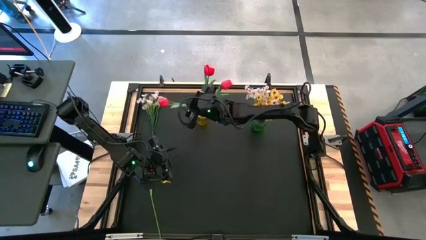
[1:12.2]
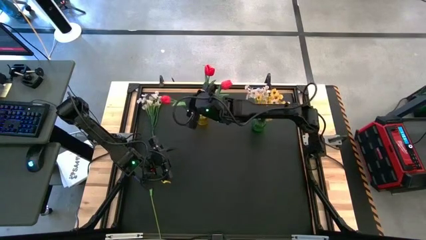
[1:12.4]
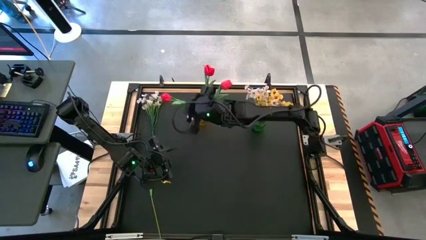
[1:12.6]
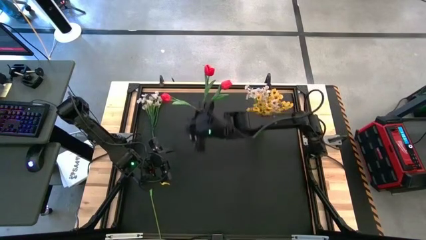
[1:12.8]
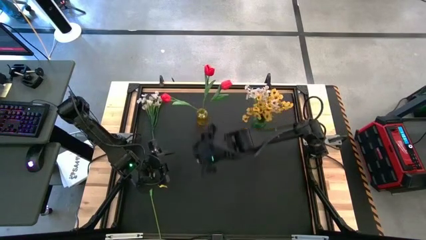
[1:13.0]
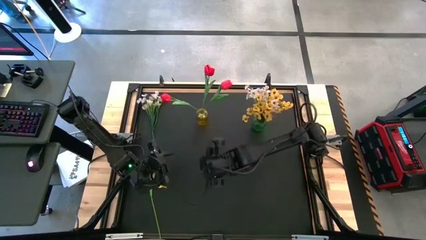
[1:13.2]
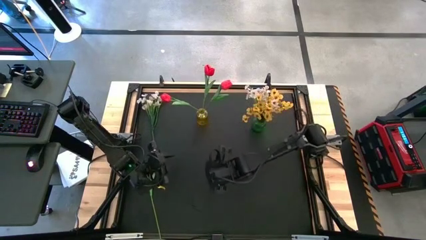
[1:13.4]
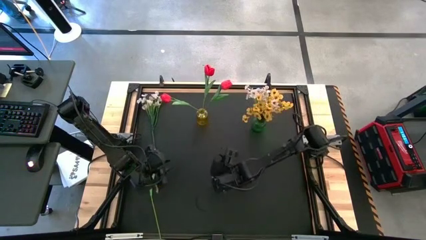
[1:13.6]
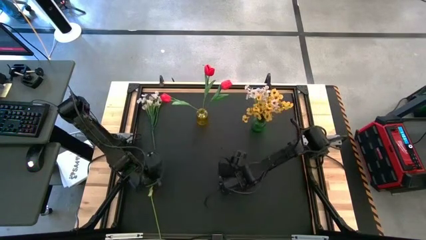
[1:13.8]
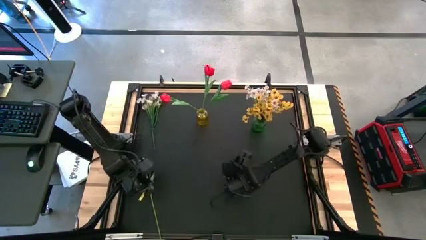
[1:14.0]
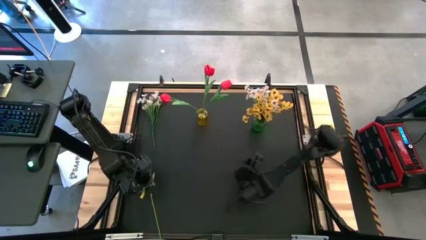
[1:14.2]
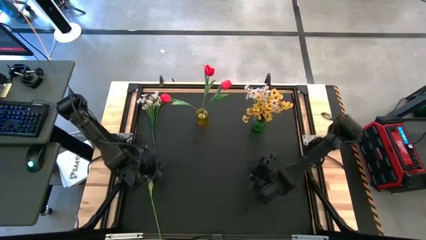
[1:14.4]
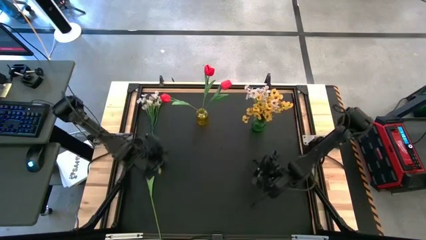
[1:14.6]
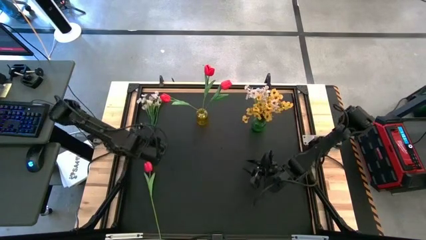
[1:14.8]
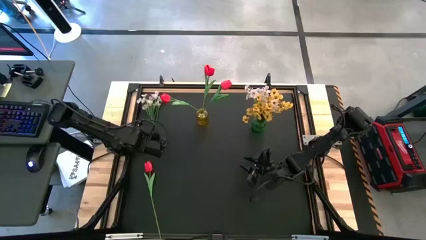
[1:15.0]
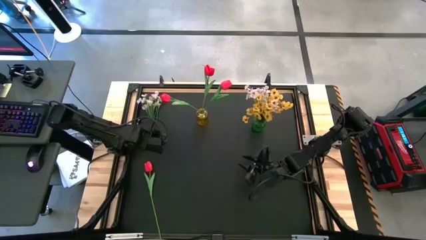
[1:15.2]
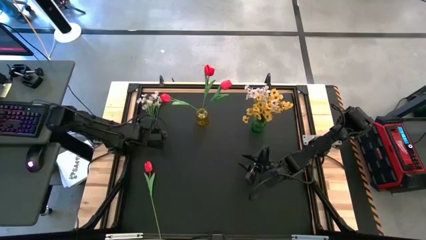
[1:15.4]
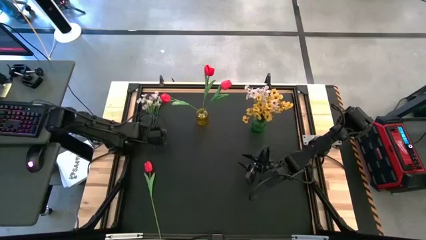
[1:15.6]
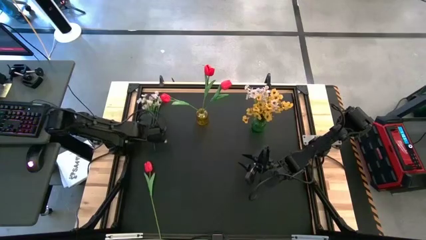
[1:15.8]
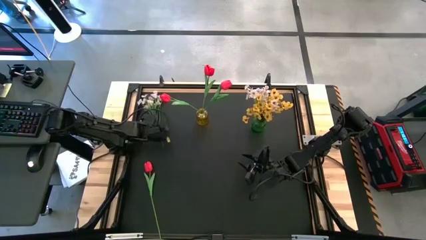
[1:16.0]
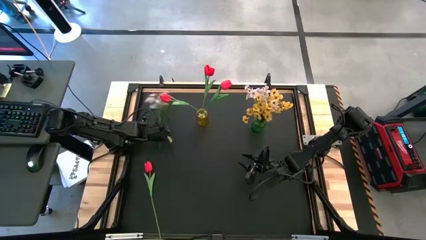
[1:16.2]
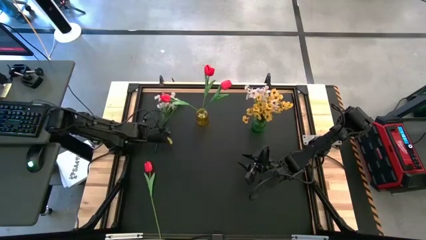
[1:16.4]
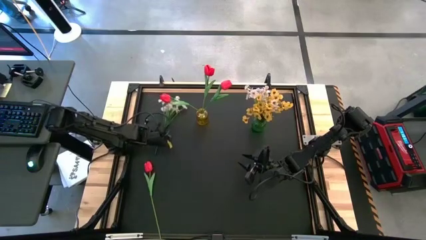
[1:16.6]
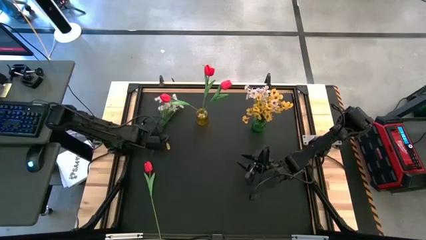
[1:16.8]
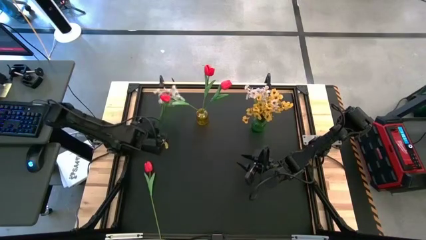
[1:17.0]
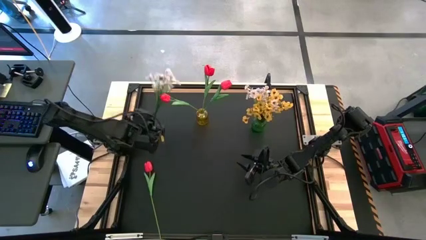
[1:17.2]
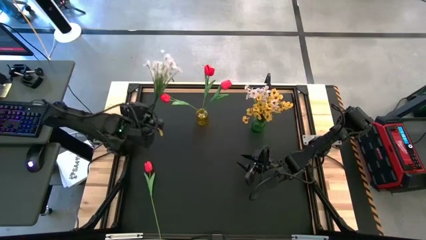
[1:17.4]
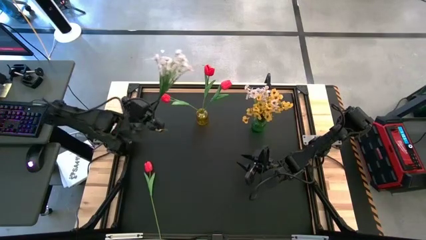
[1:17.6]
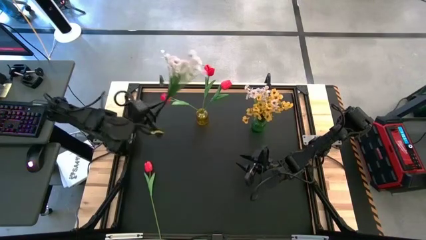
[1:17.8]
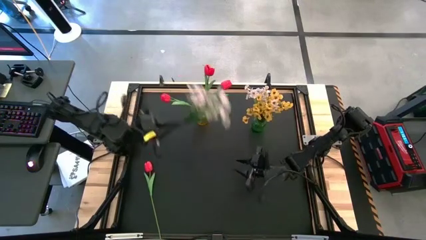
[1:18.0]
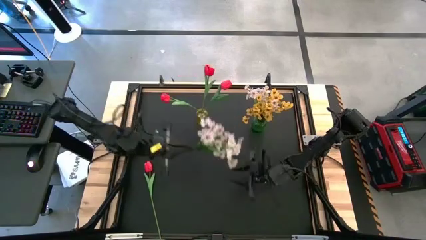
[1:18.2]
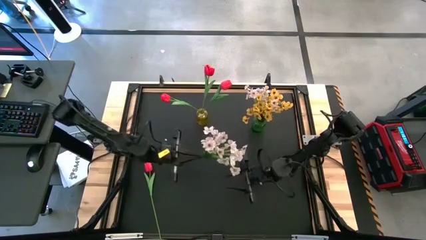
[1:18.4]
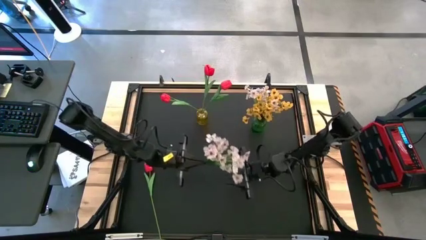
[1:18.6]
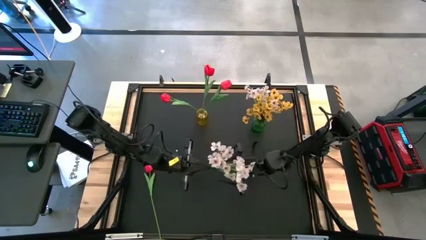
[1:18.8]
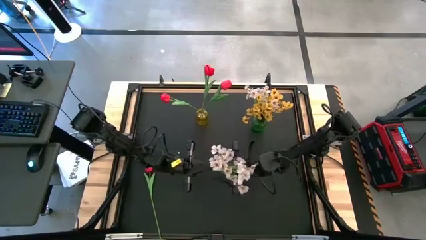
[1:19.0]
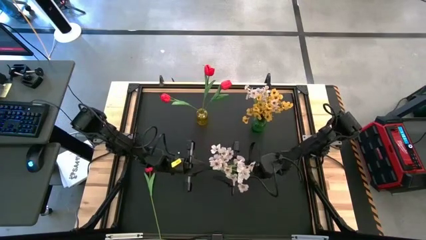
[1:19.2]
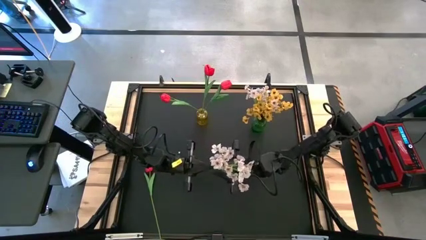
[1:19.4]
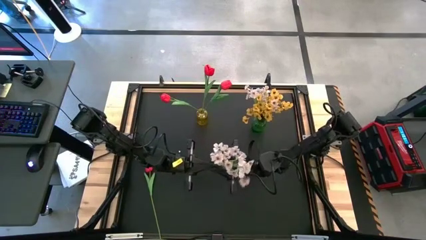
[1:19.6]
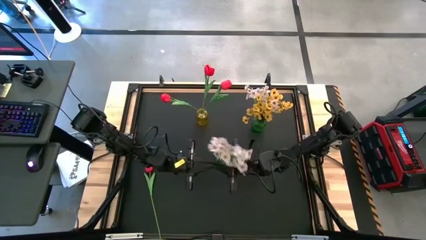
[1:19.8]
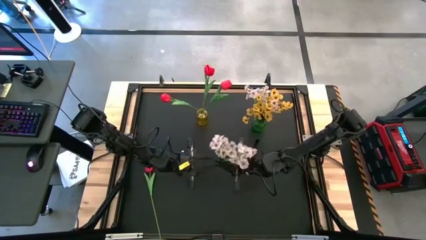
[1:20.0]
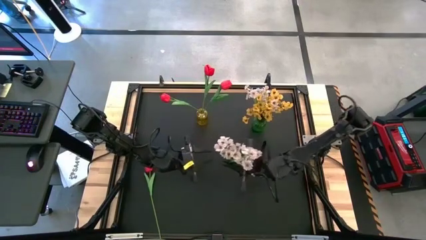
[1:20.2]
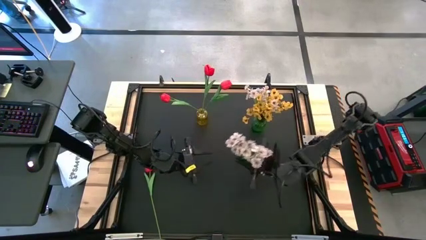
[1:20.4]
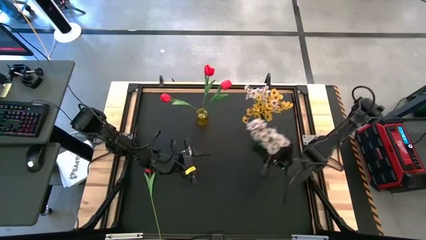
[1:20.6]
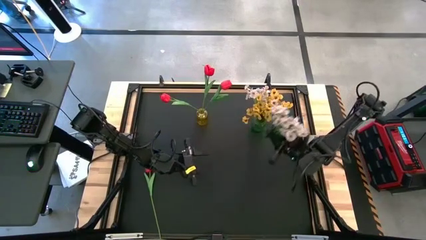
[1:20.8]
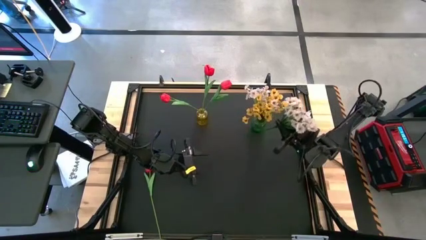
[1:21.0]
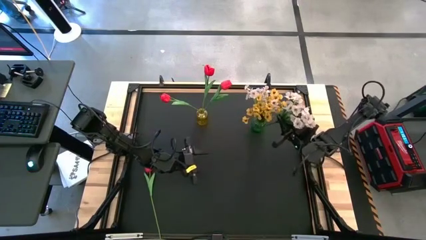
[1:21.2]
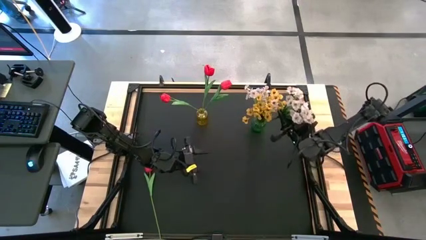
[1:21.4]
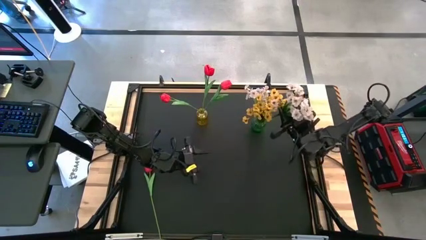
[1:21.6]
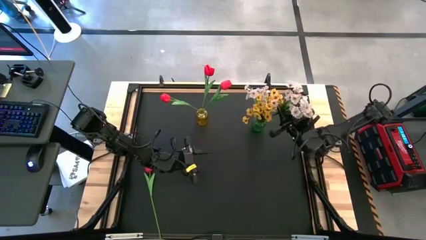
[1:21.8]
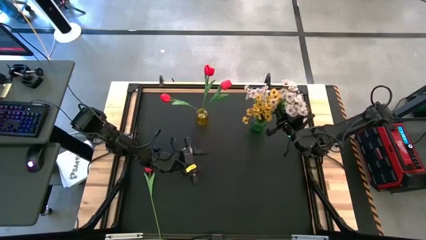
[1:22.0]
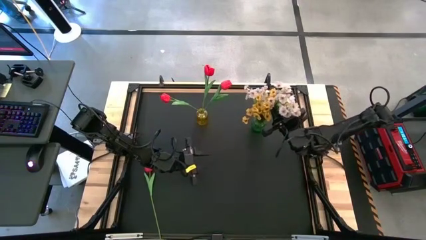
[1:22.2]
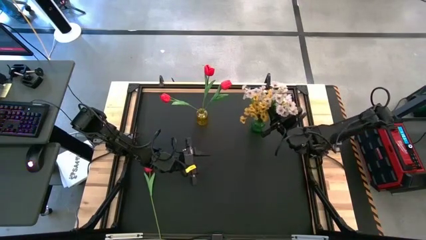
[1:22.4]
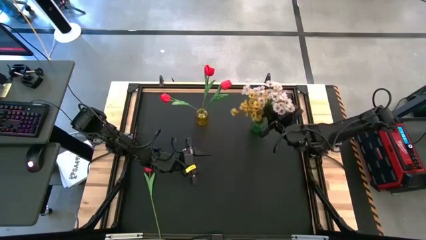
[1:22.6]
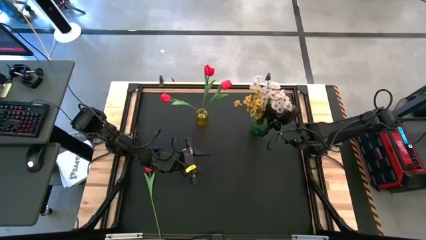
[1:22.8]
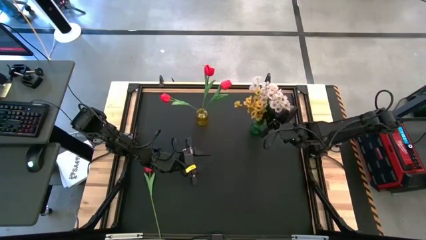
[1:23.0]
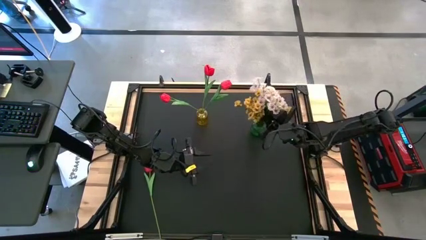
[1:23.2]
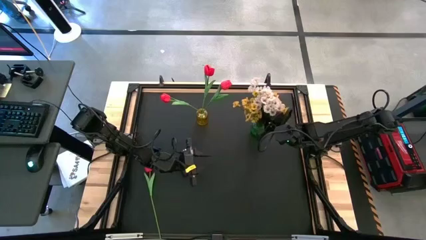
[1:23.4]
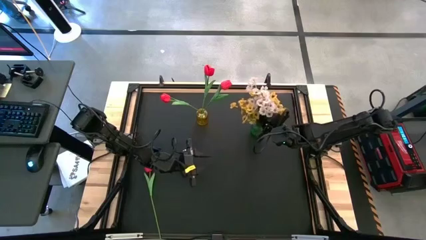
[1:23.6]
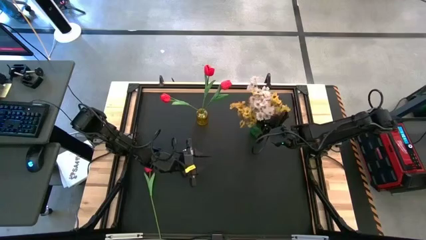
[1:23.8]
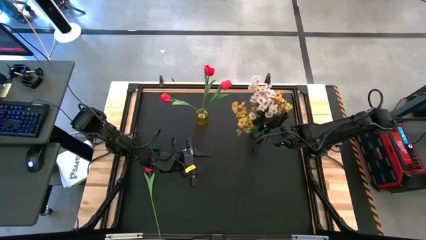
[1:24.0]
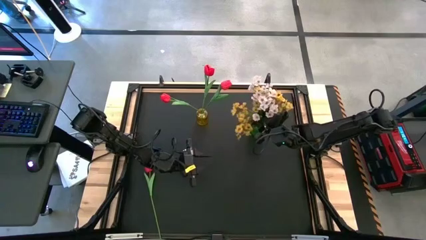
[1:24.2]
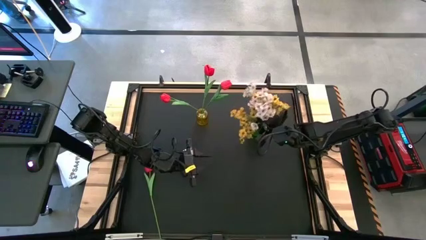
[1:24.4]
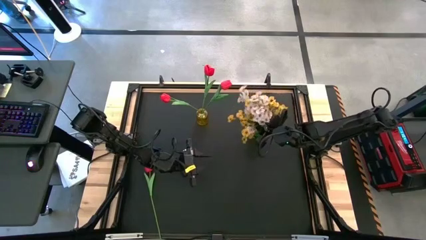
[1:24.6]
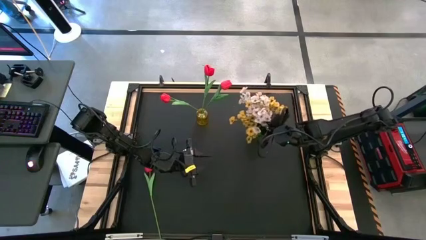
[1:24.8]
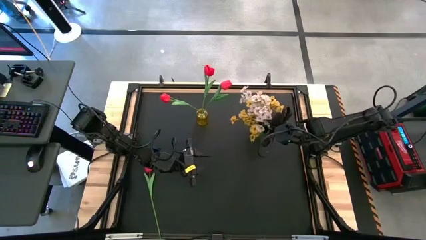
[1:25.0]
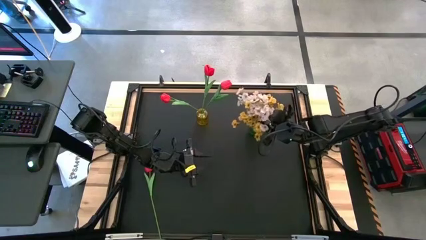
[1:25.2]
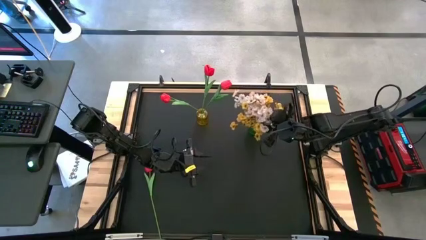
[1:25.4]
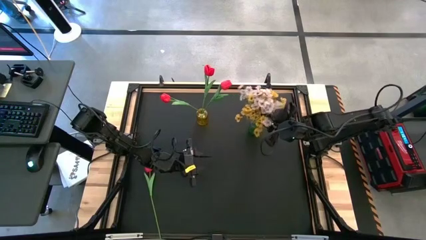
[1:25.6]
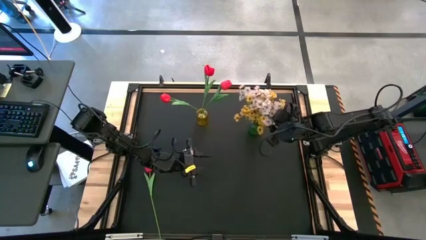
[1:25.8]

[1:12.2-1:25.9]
Task: Sort flowers into vase by color
Put the white flowers into the green vase

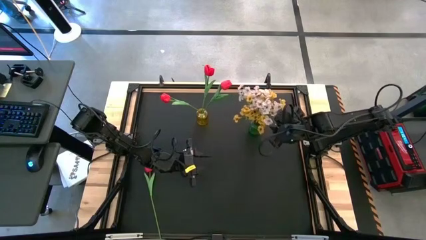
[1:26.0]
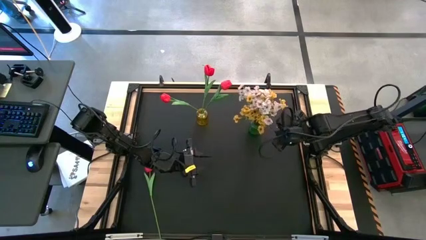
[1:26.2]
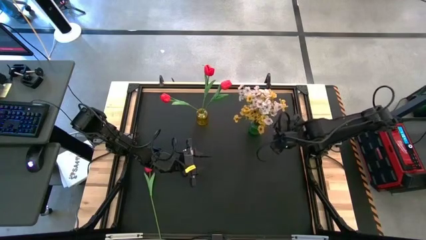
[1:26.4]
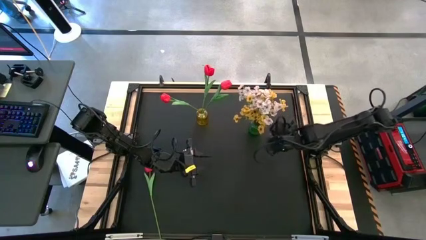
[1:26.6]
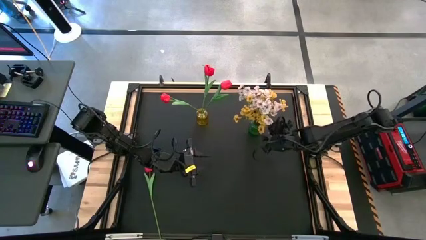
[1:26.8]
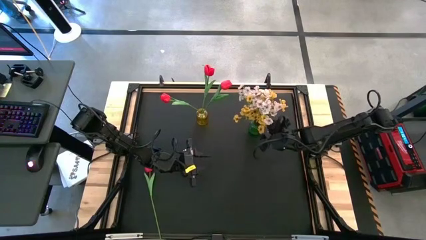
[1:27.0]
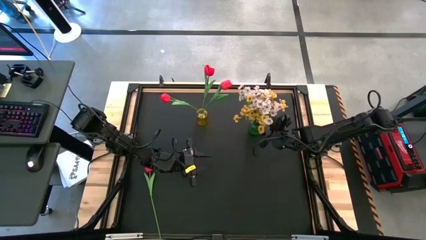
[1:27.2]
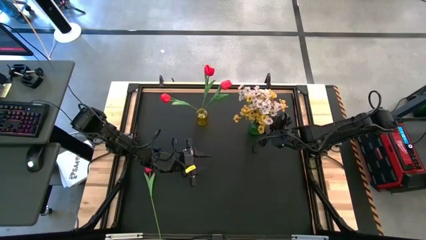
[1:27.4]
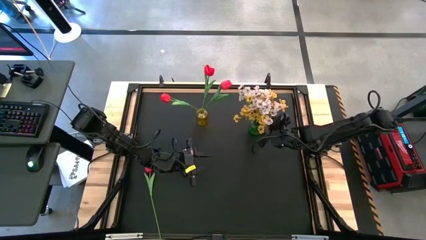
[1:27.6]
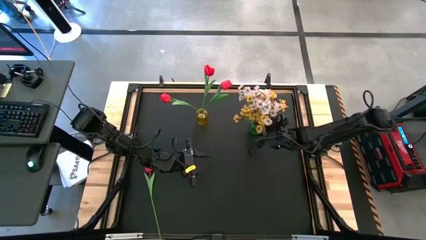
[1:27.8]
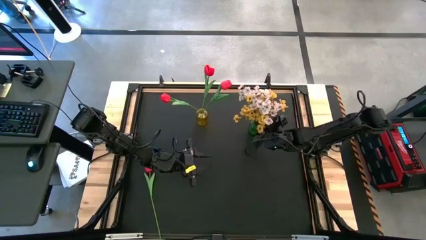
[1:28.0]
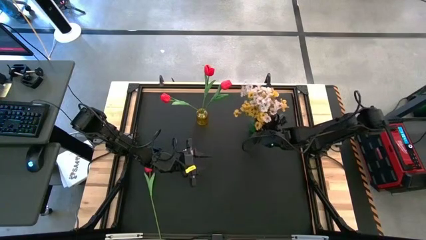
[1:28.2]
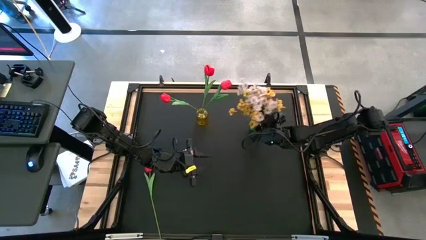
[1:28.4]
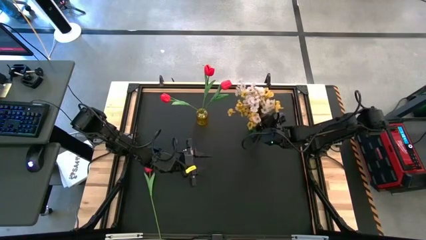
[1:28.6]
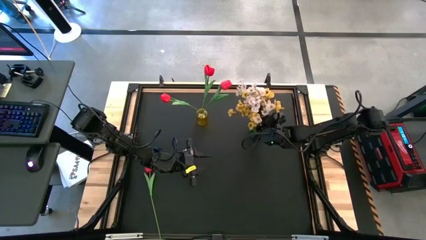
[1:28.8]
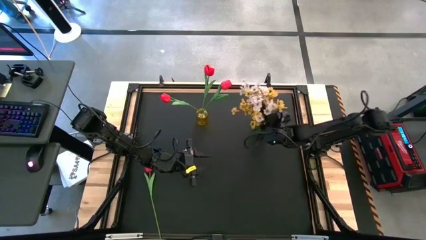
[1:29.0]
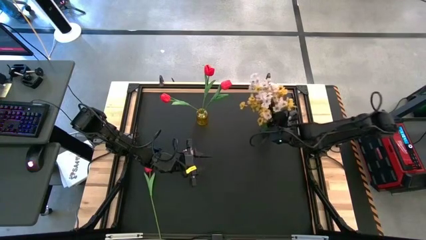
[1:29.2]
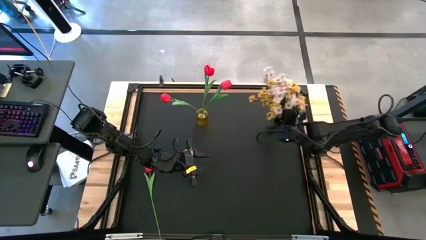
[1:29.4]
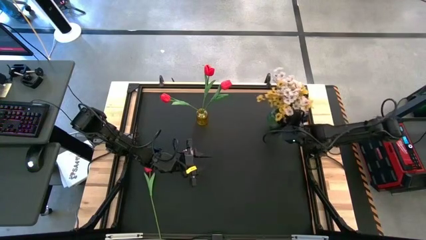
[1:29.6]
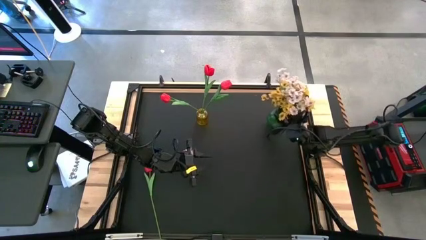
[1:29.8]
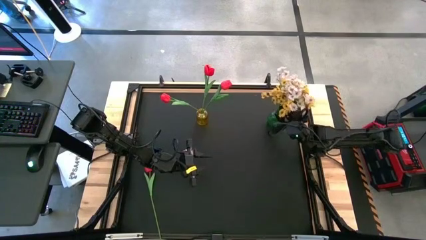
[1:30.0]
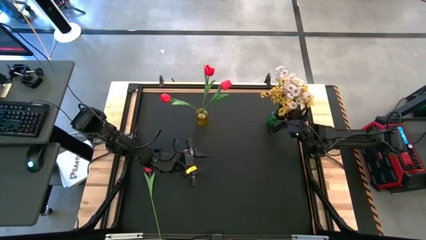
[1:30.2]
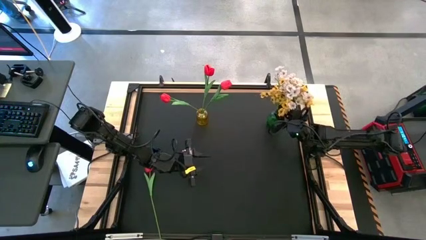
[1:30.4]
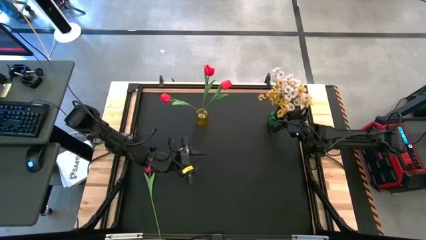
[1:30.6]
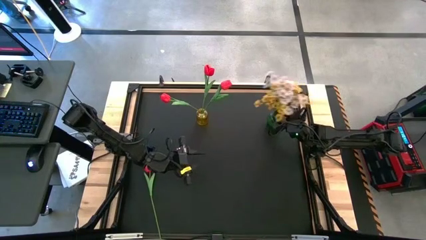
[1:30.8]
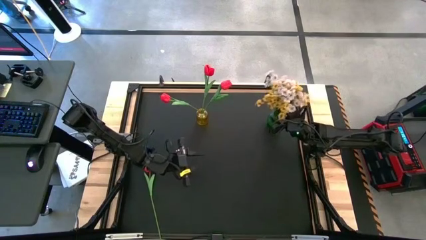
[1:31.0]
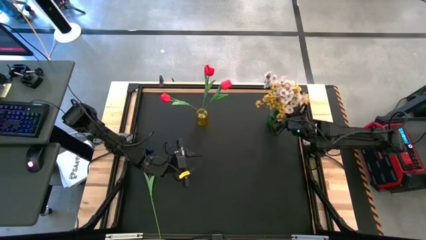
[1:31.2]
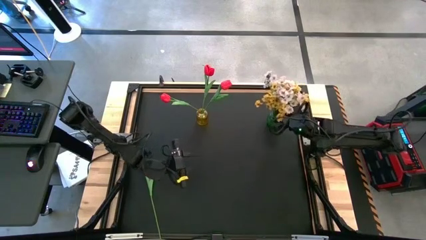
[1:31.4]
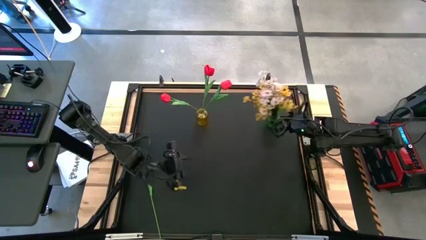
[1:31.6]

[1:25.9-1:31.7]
Adjust the green vase
